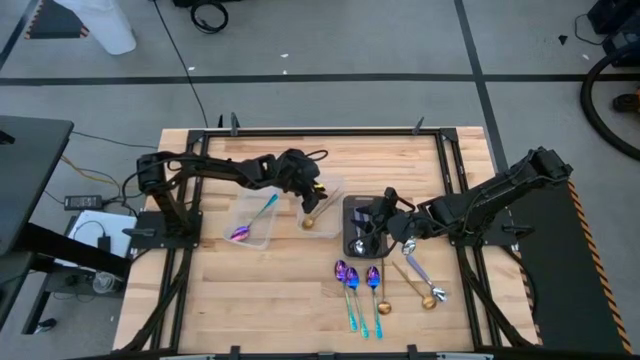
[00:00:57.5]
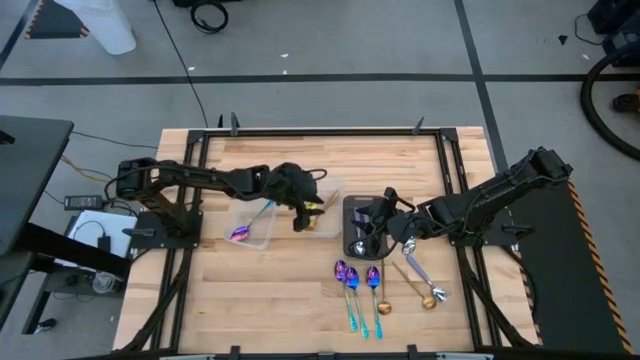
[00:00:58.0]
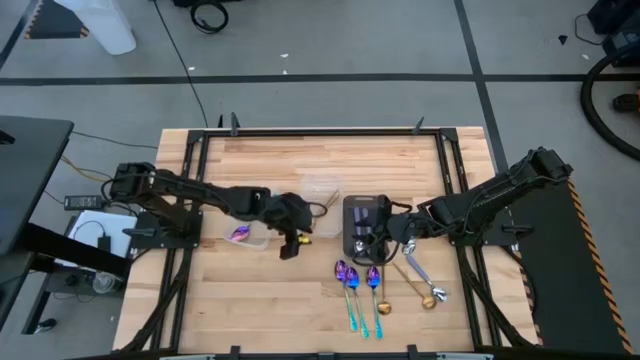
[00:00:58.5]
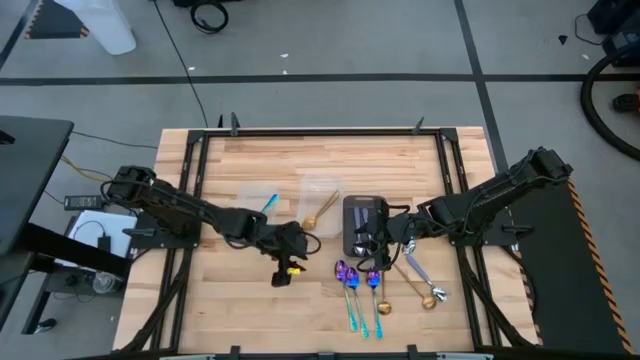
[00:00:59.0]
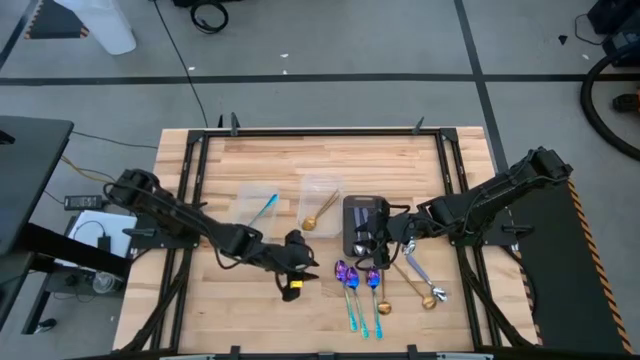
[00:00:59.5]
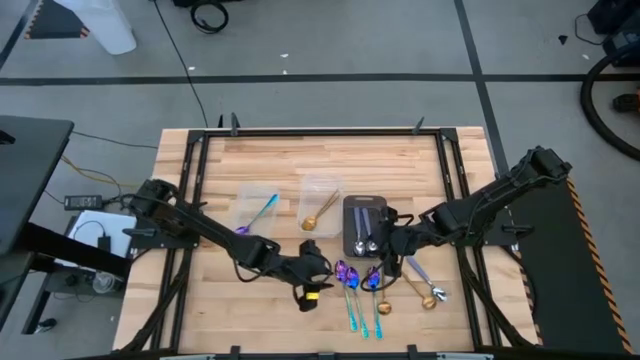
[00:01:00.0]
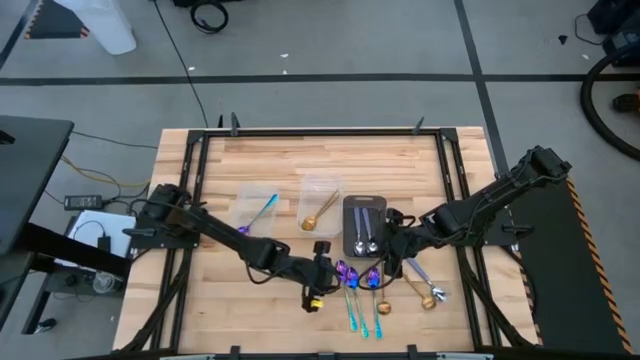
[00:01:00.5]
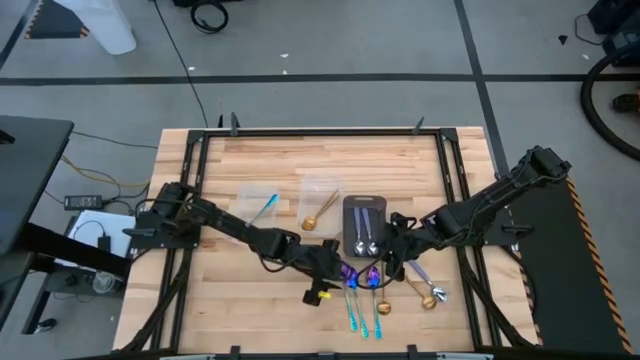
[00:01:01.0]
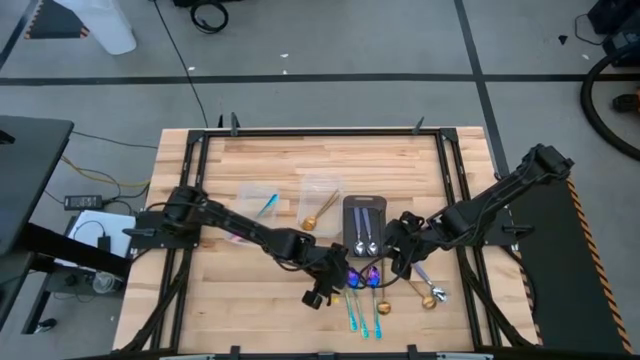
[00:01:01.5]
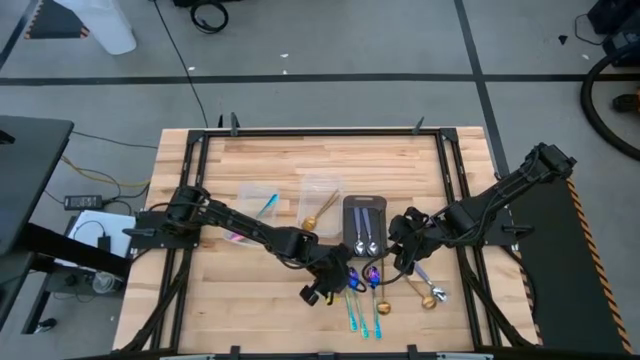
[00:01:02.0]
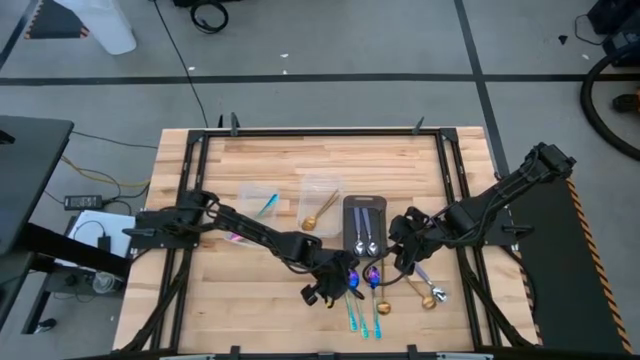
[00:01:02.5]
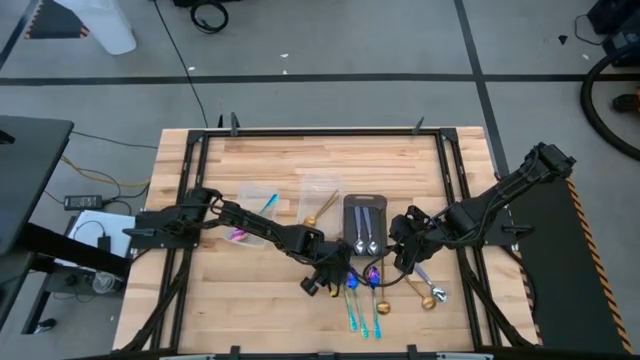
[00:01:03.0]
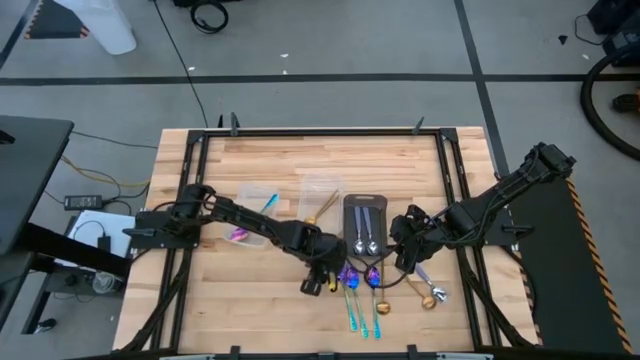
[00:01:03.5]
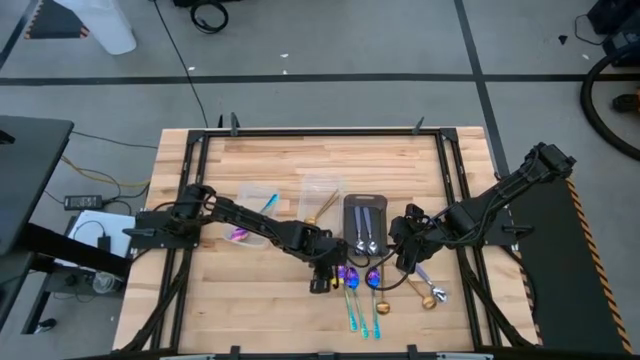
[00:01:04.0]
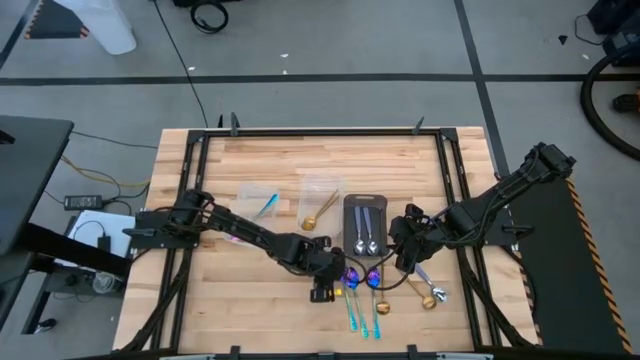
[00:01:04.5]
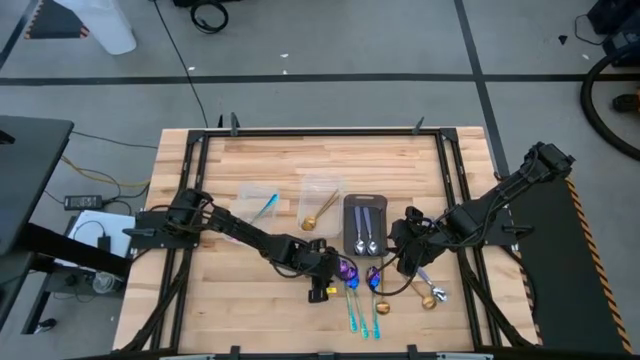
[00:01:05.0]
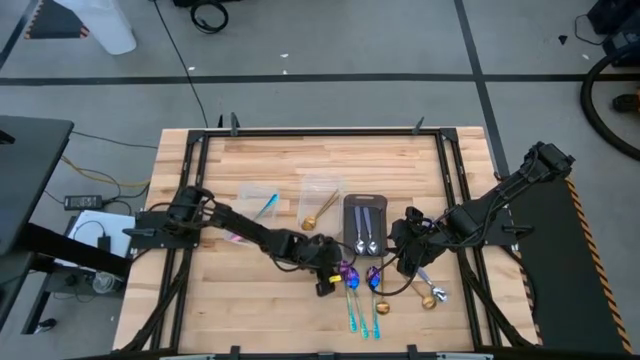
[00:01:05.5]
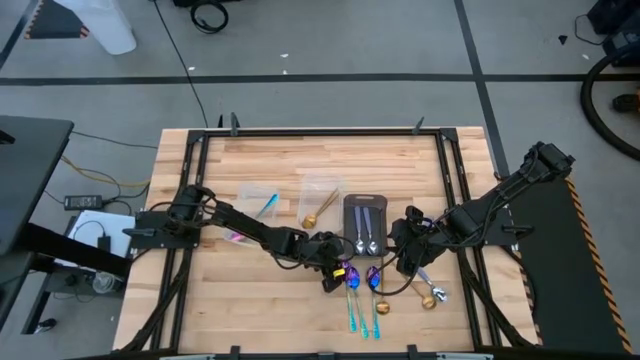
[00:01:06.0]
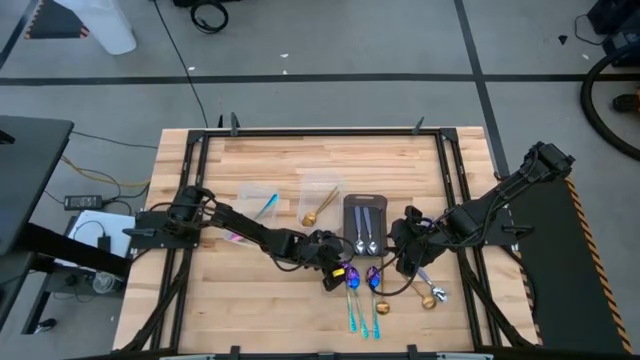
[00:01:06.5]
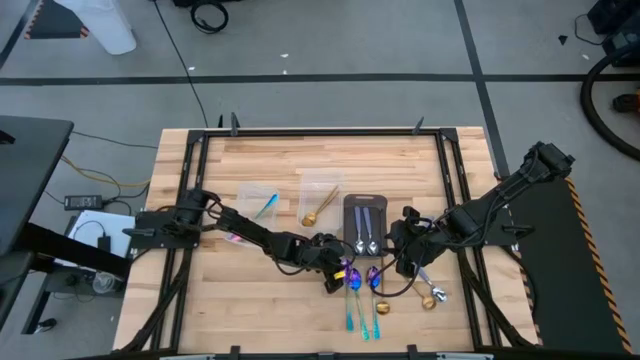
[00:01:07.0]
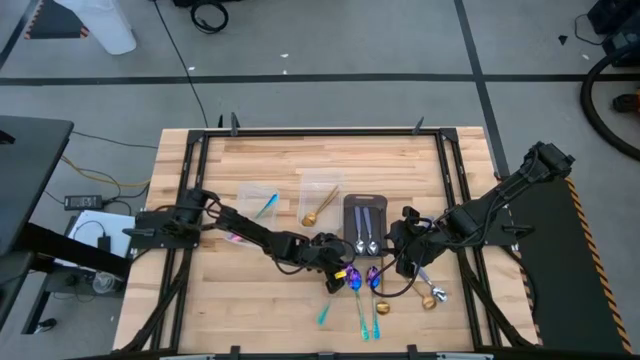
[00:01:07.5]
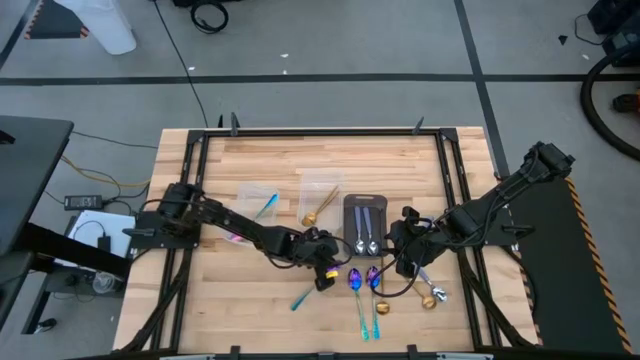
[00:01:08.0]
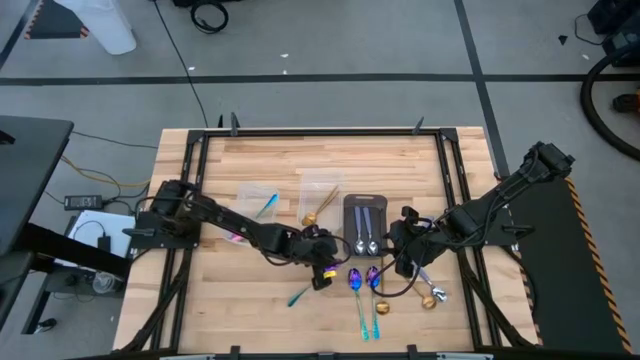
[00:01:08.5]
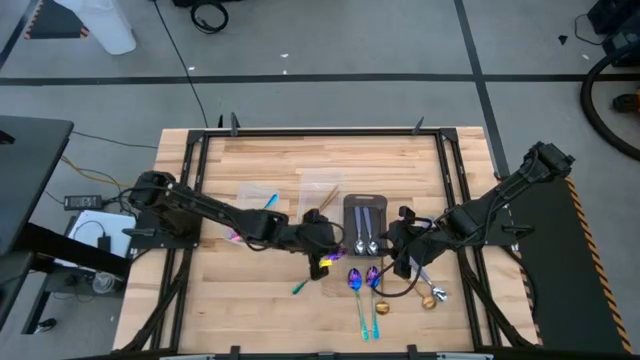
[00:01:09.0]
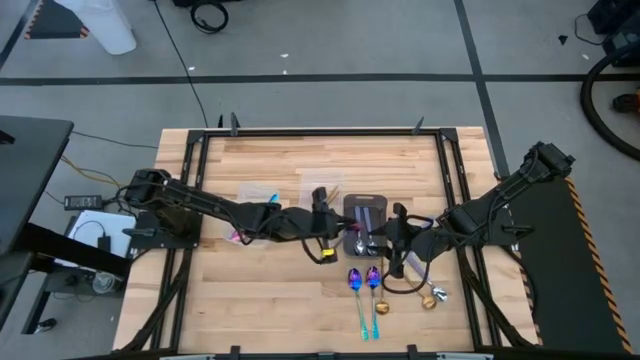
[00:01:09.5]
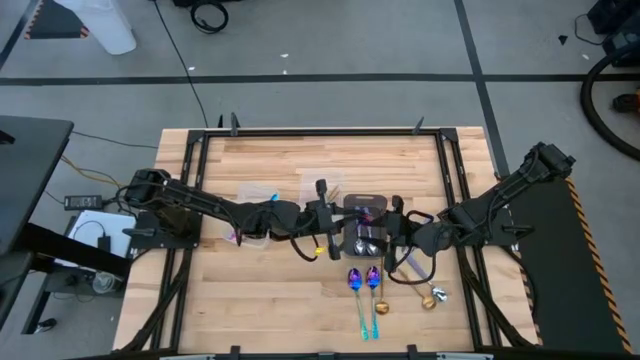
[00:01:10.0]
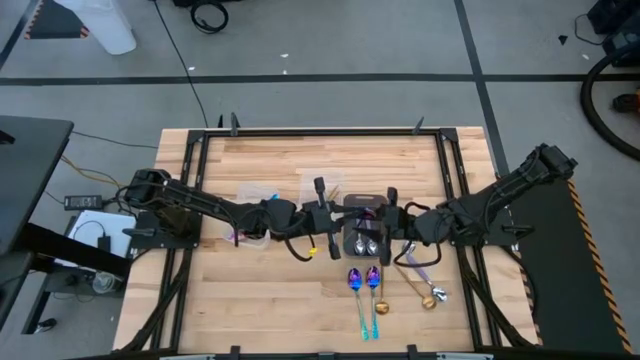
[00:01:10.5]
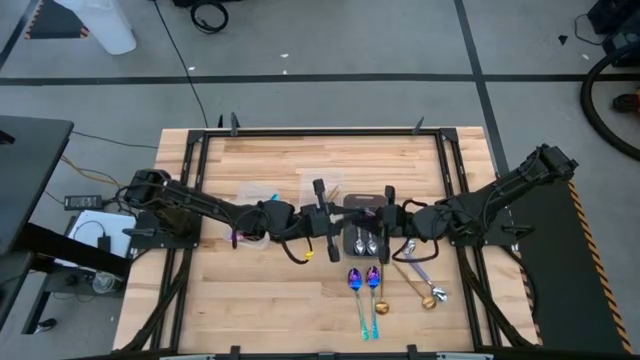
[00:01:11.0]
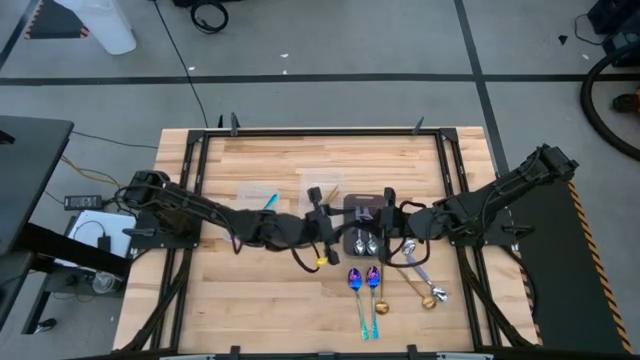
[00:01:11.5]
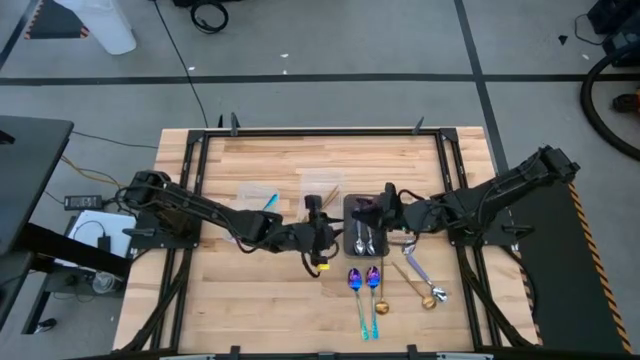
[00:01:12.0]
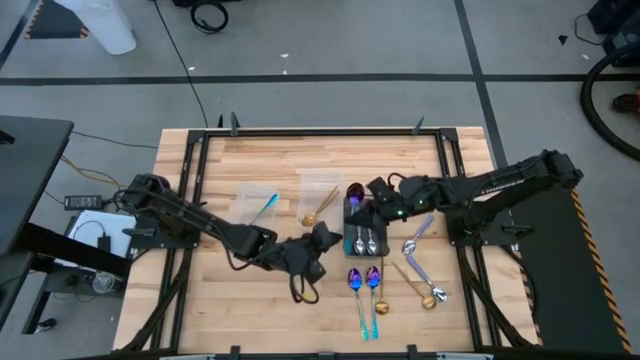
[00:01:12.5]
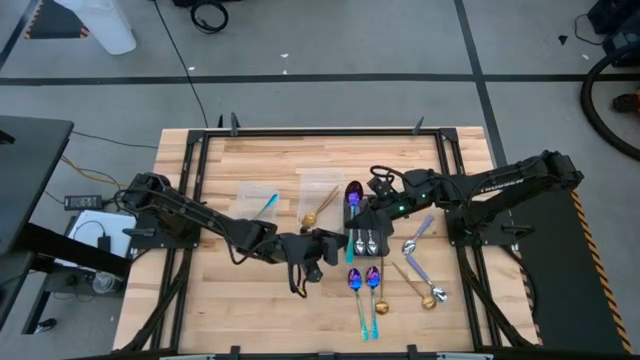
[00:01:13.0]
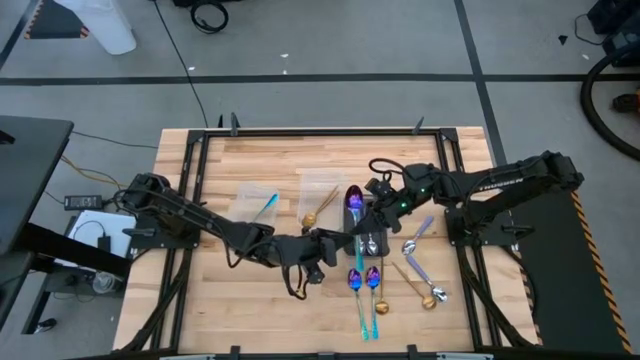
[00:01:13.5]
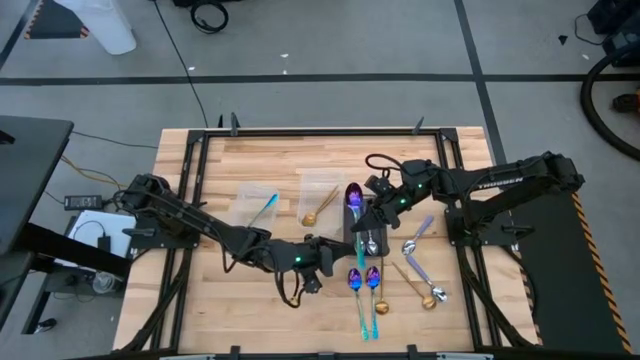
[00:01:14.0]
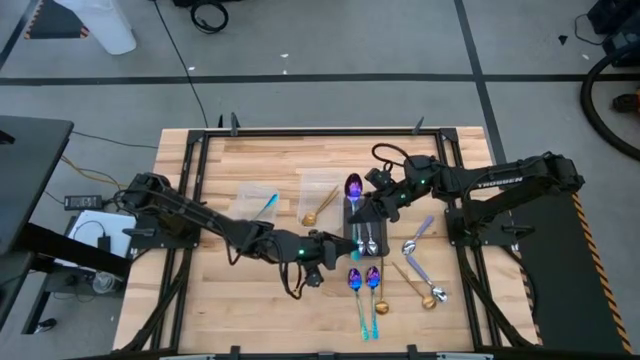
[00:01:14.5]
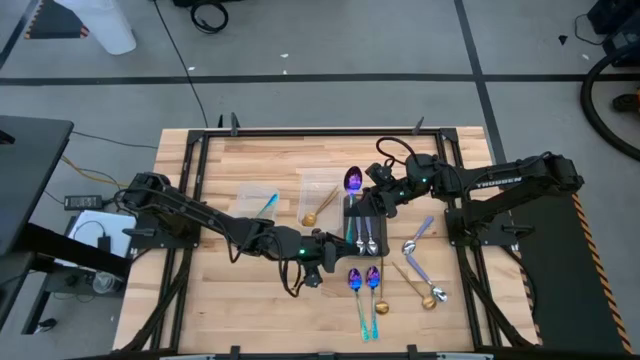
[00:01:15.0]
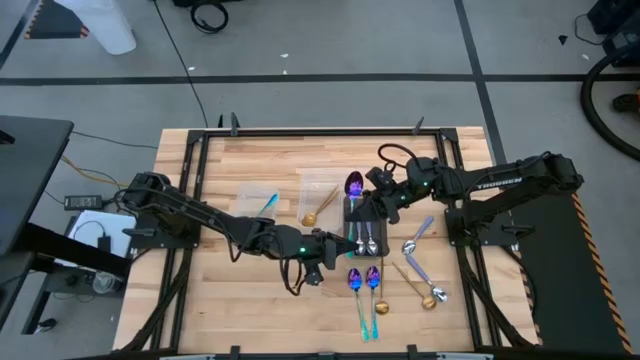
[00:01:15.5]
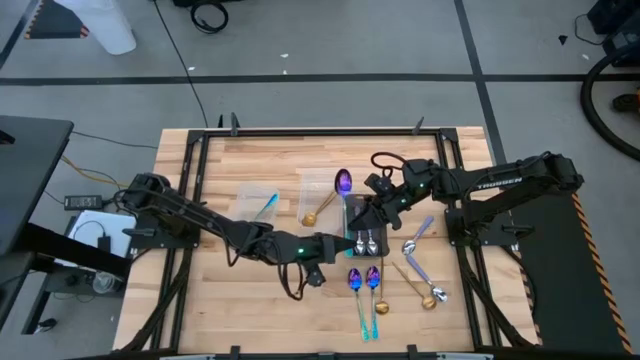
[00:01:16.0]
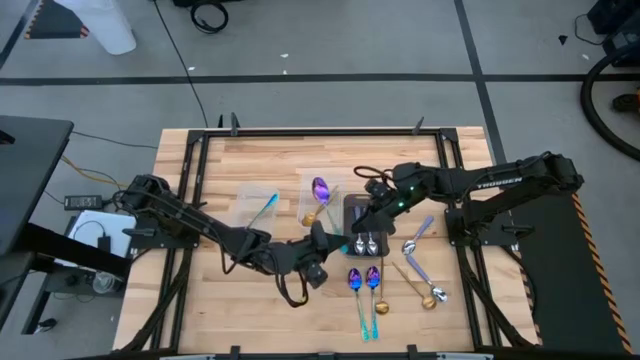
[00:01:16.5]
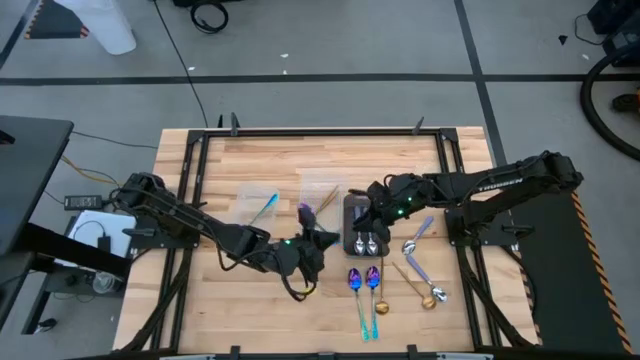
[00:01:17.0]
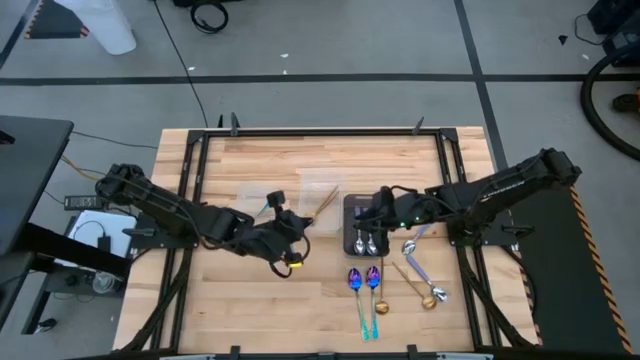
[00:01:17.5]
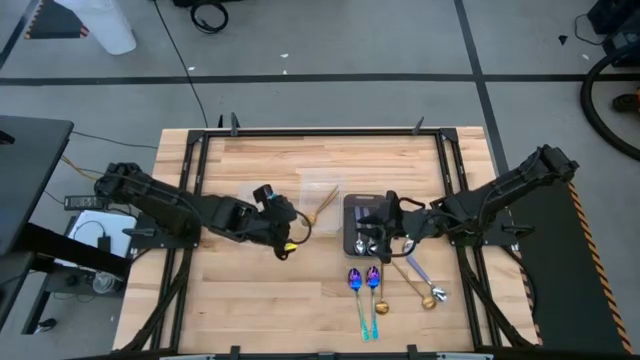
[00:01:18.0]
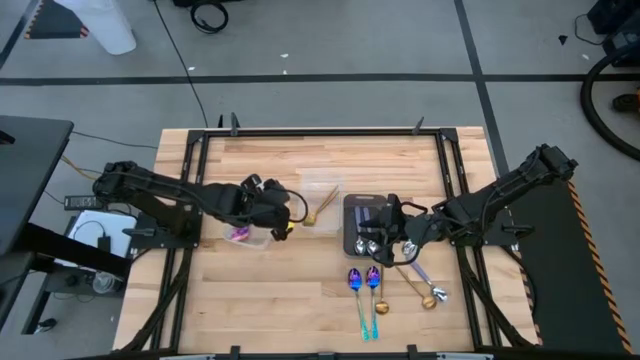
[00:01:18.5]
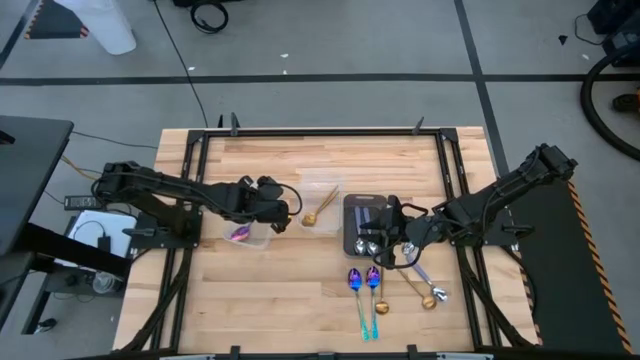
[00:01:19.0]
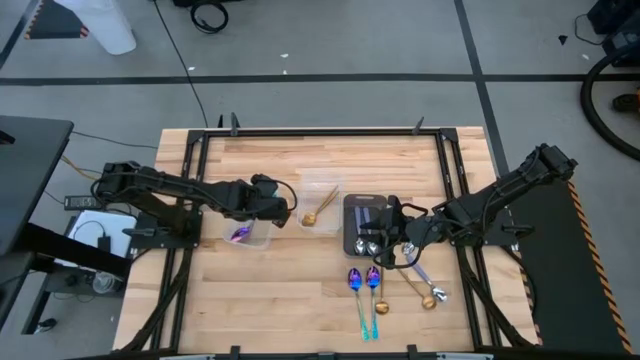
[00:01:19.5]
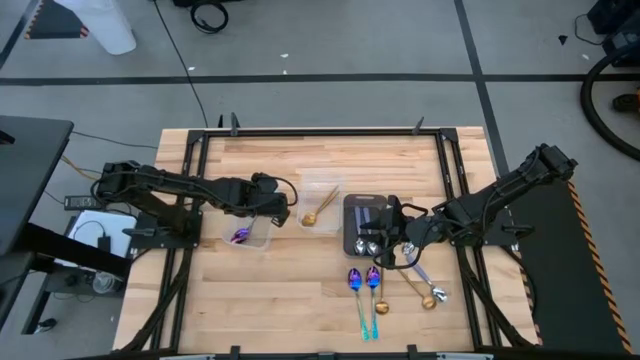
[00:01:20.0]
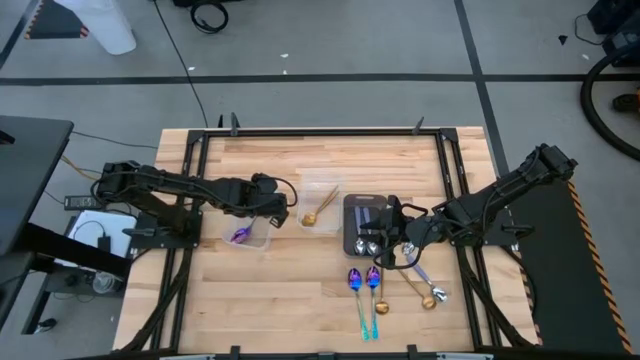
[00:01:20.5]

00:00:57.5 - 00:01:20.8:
Task: Sort silverware by color (type)
Put the blue spoon into the left transparent bin
